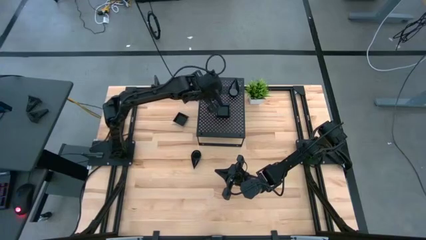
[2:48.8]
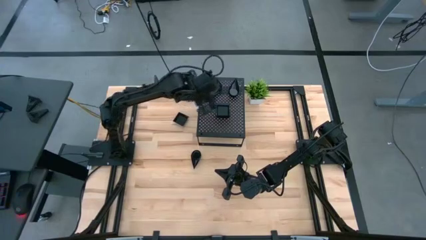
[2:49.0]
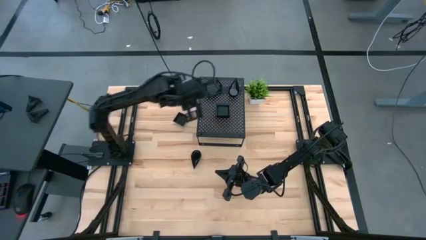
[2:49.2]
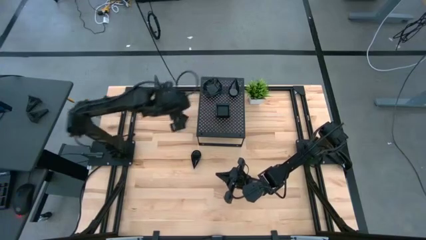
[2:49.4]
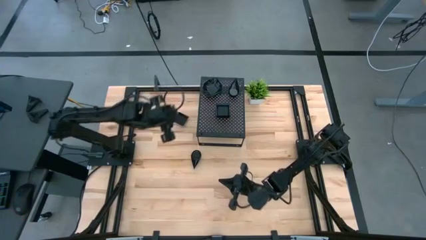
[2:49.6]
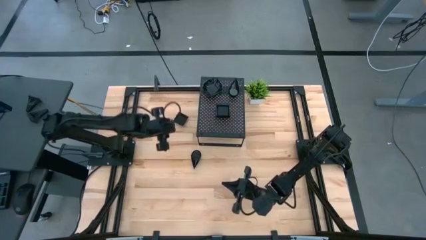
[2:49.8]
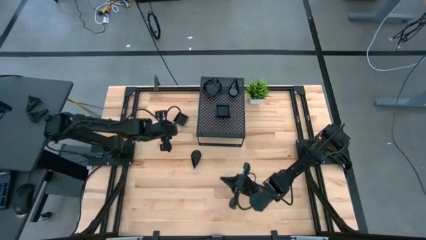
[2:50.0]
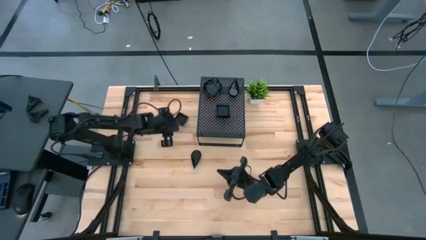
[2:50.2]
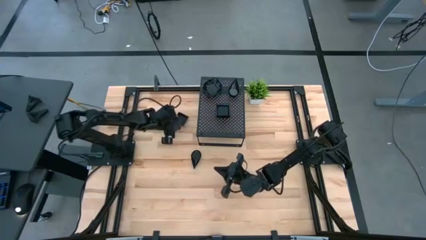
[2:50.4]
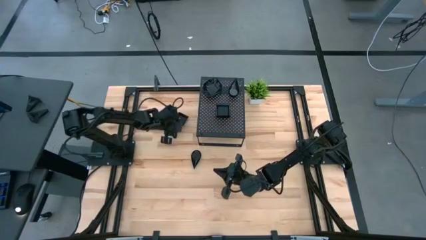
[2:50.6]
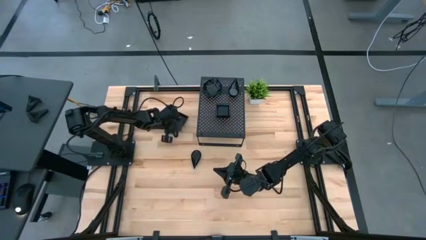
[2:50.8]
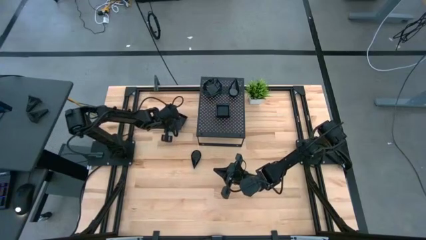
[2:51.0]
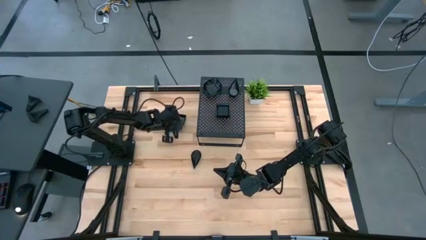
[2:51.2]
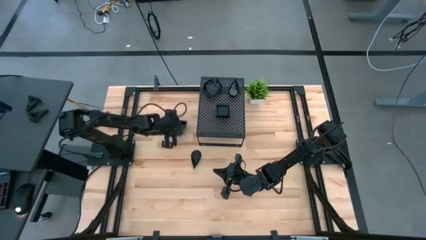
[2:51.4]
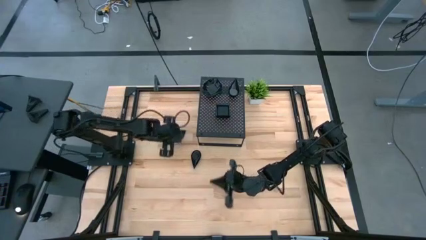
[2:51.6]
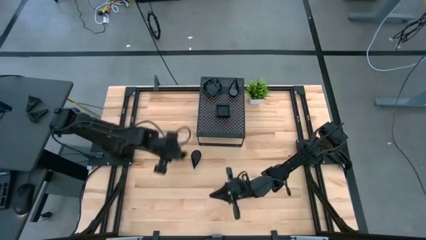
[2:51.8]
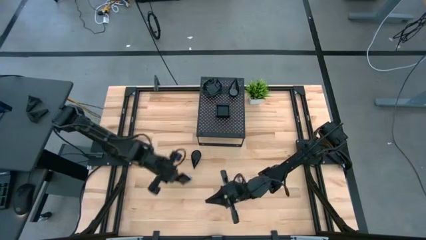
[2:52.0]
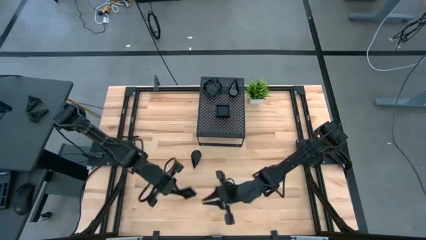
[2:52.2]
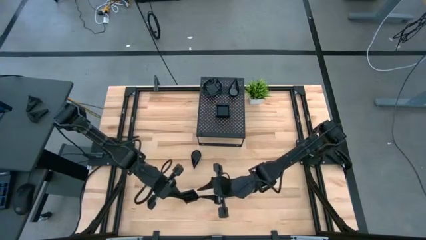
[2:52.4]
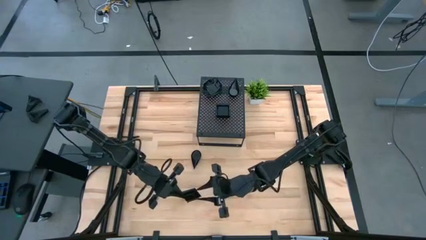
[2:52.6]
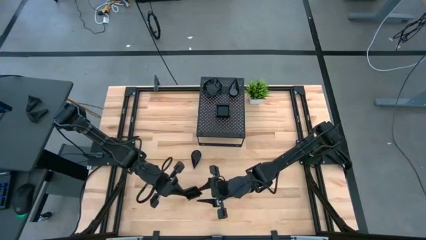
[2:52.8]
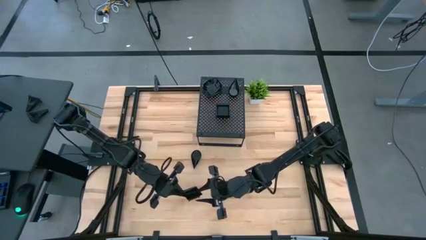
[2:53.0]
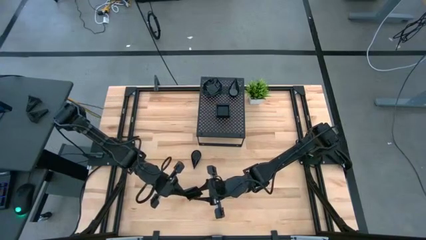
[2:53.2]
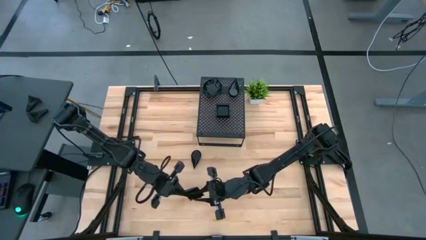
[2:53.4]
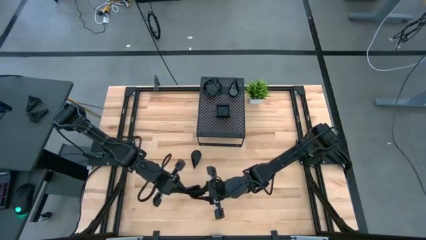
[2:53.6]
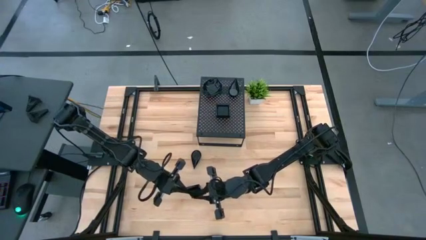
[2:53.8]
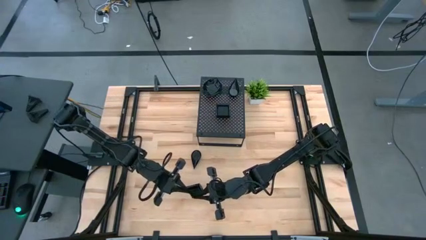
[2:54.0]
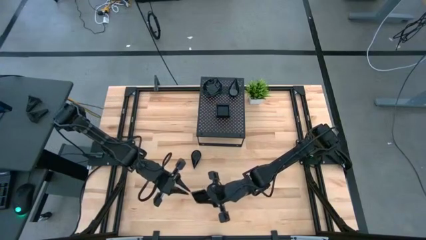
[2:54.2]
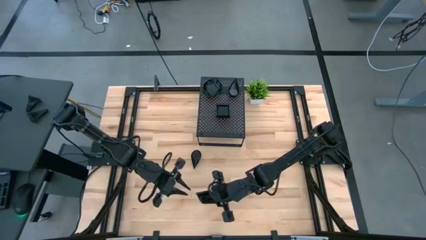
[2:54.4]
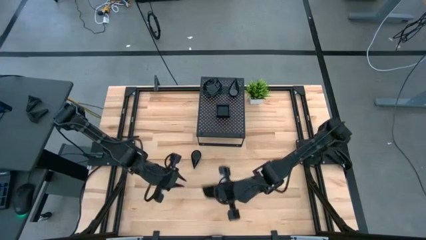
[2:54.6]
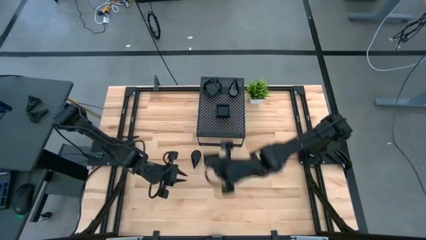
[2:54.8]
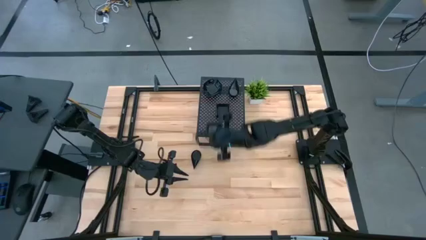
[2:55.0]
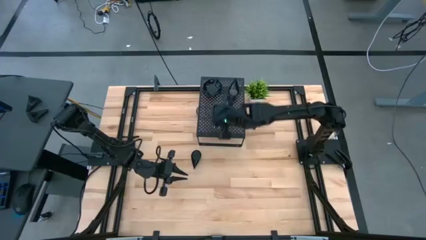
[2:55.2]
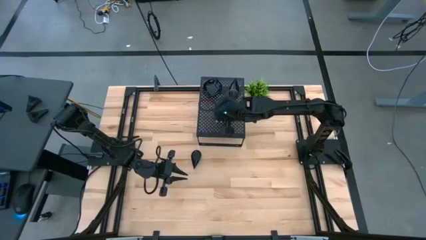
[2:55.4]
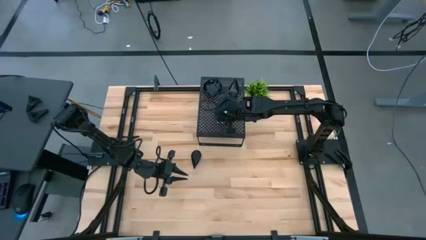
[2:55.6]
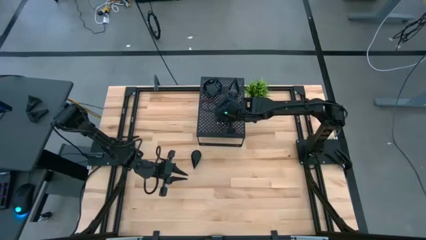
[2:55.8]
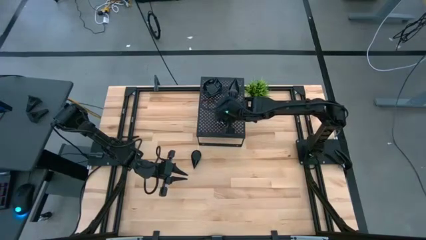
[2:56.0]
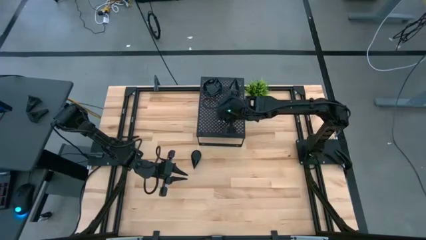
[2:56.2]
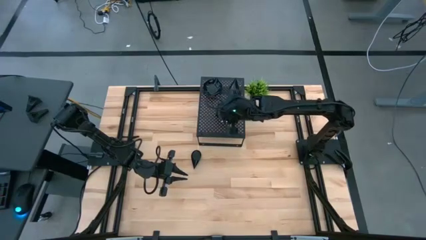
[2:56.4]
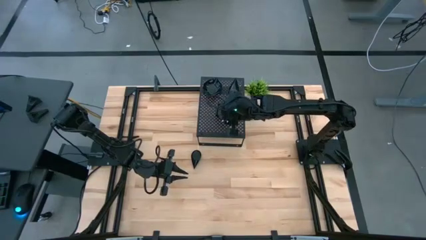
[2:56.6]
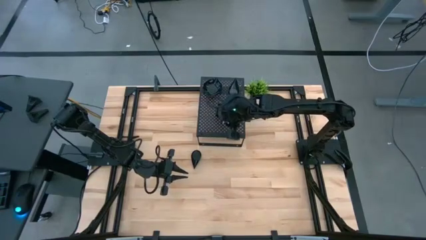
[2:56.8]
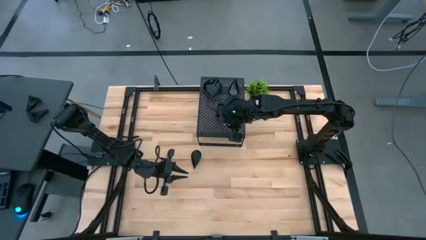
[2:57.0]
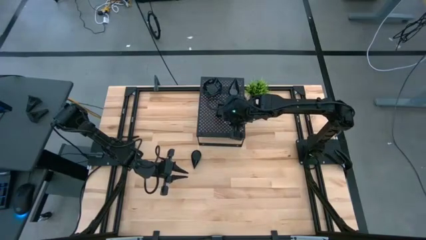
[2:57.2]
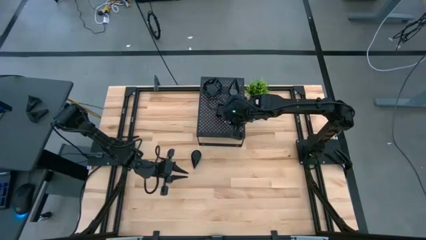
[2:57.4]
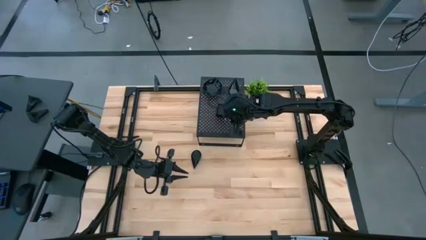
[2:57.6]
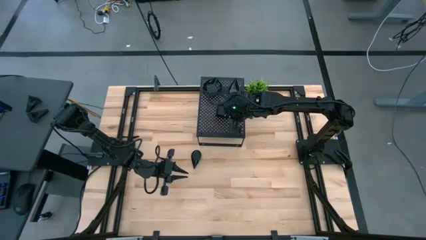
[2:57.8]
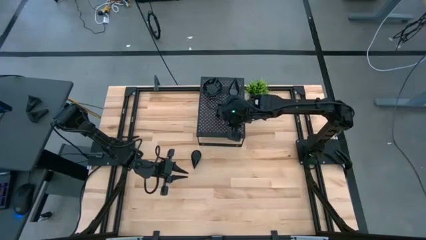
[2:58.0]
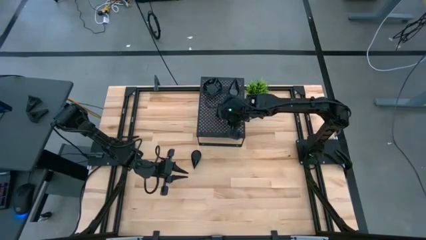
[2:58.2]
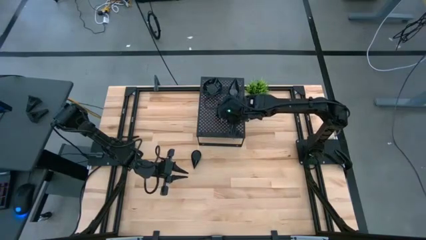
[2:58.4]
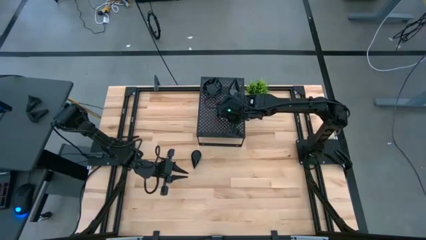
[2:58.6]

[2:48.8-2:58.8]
Task: Pick & Place Mini shaped plates
Stack the black square-shaped plate on top of the black square-shaped plates on the shelf

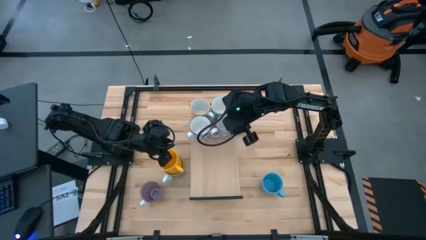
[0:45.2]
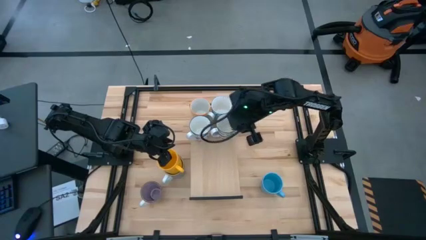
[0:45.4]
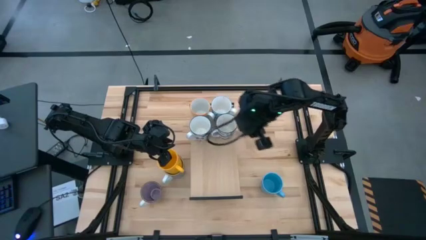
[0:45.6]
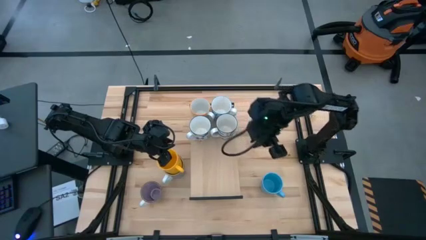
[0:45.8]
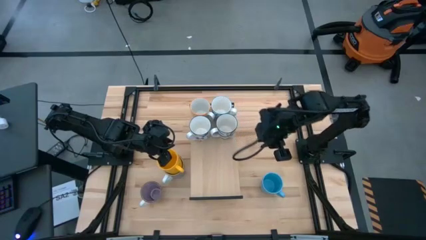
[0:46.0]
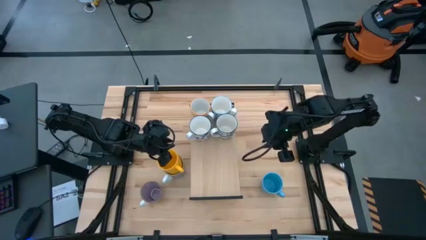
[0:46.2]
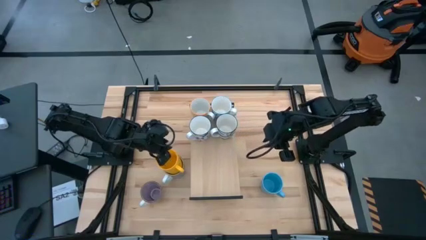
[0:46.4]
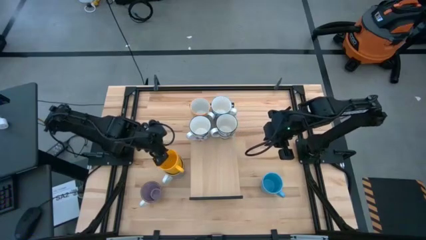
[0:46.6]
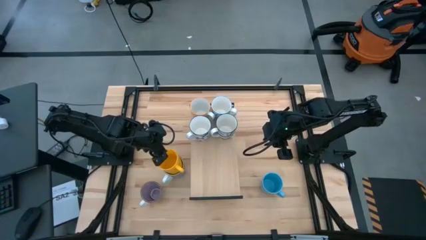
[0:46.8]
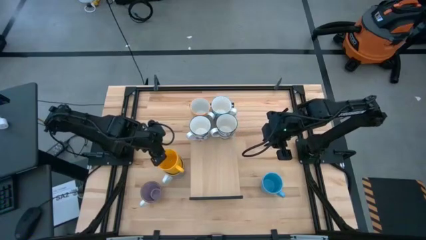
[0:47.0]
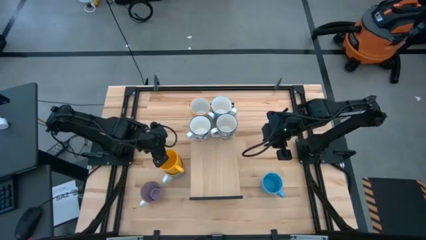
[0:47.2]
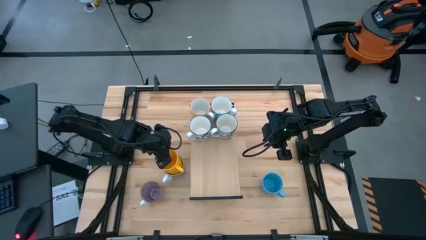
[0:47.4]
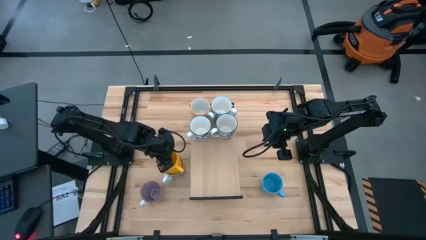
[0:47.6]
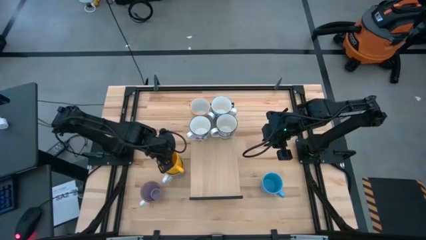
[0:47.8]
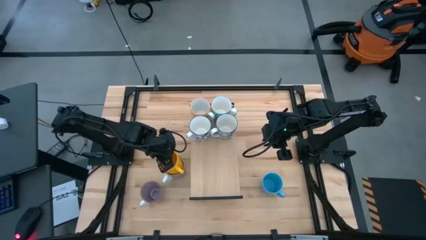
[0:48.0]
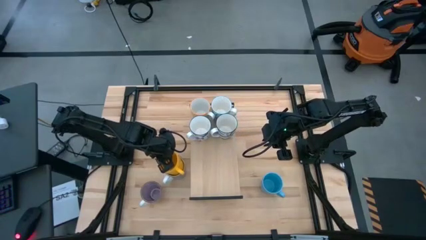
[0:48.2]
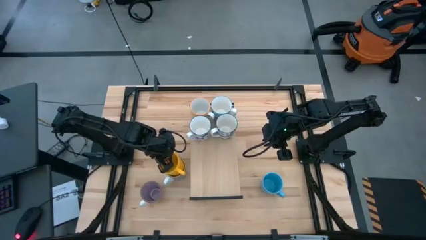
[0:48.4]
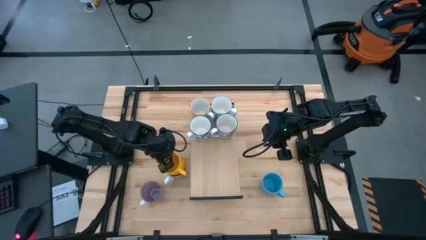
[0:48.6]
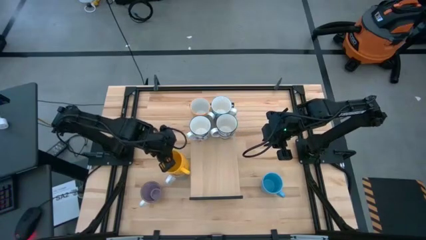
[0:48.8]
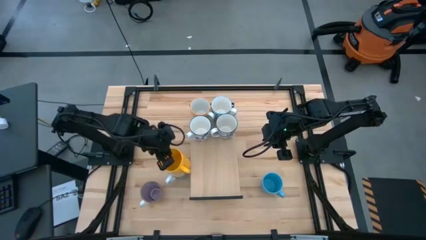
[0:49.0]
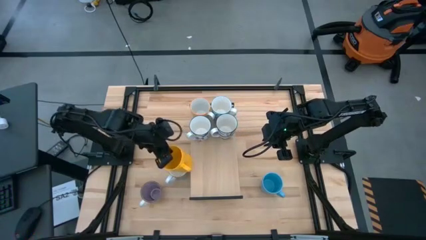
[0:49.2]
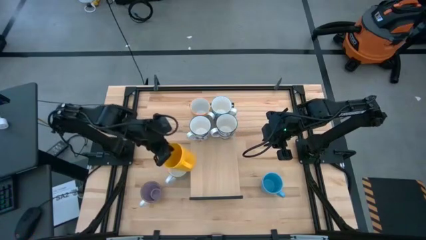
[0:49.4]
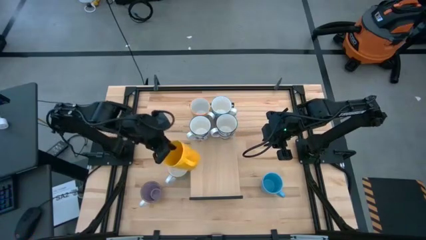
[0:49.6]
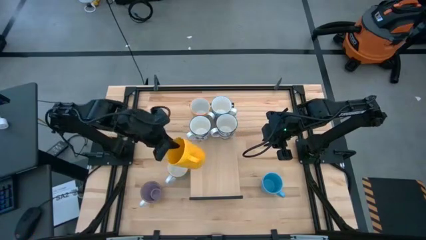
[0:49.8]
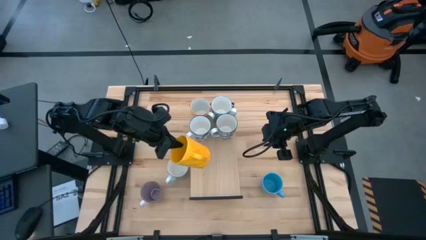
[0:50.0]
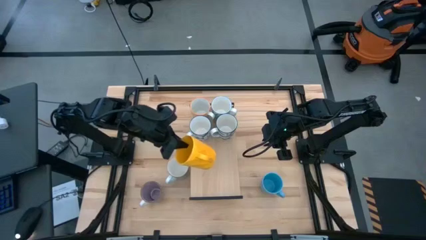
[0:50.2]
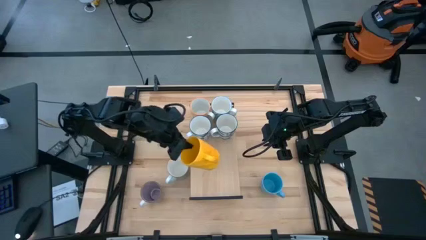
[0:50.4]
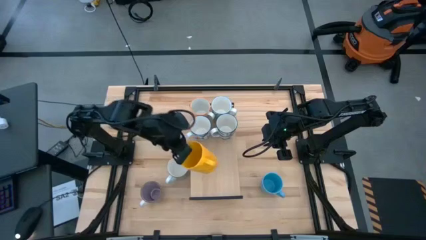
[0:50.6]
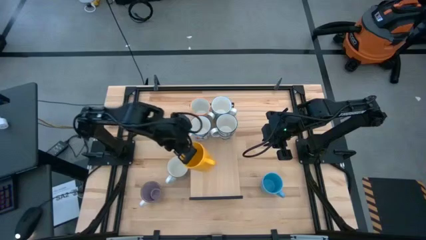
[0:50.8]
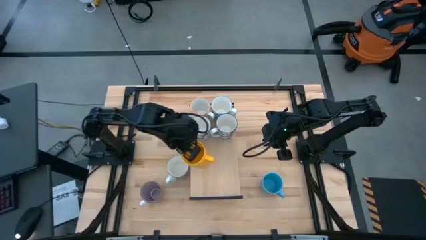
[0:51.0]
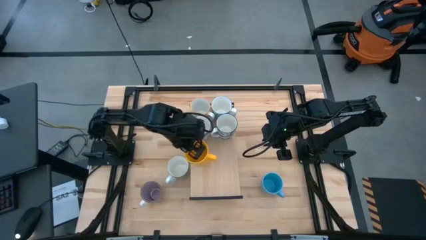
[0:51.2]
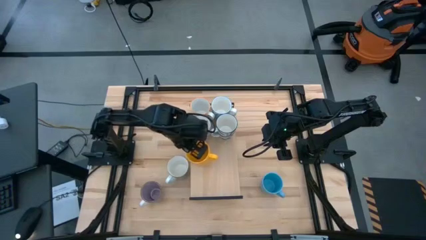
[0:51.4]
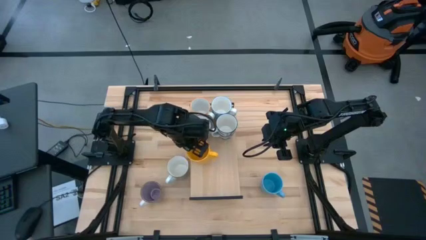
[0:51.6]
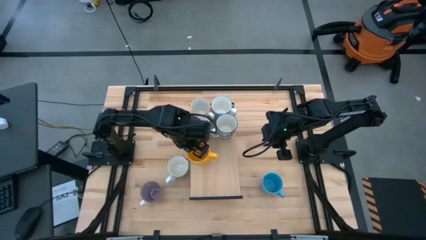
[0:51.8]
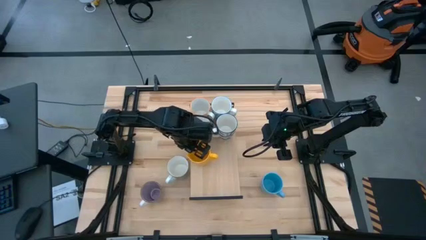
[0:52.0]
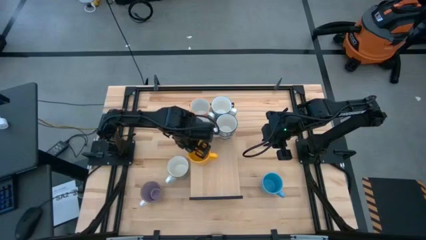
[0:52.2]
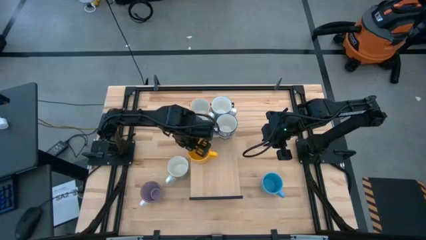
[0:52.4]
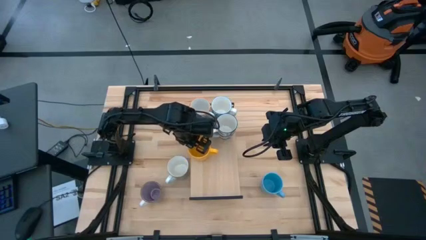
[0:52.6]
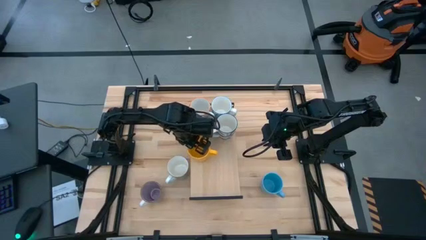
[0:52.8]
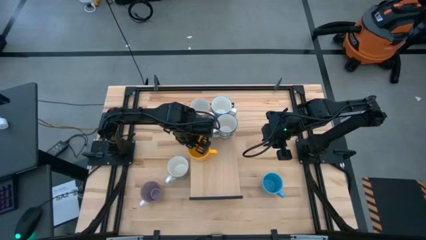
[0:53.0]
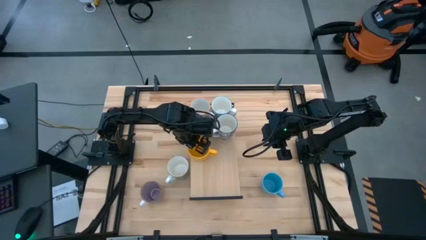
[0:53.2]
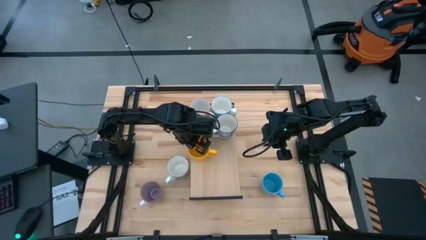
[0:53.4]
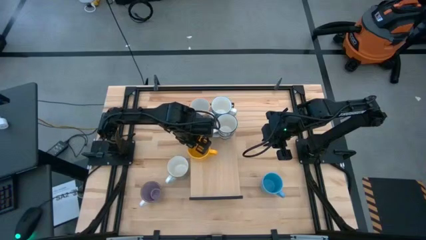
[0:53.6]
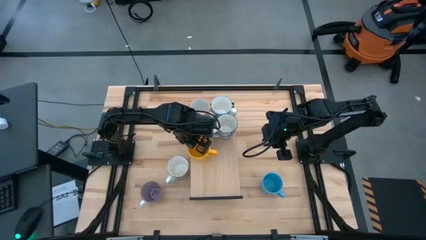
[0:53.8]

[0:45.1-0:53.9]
Task: Place coffee mugs
Put the yellow mug on the shelf
